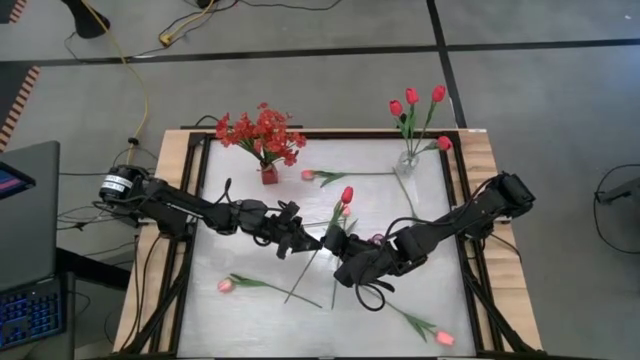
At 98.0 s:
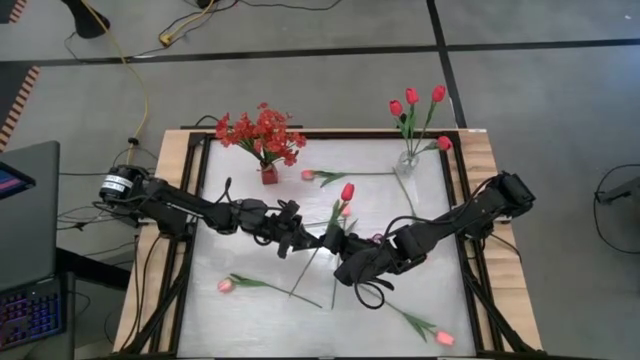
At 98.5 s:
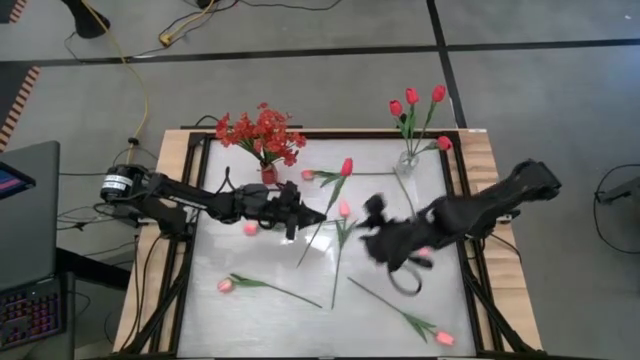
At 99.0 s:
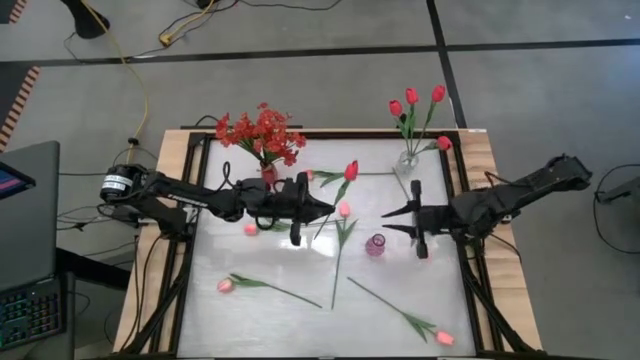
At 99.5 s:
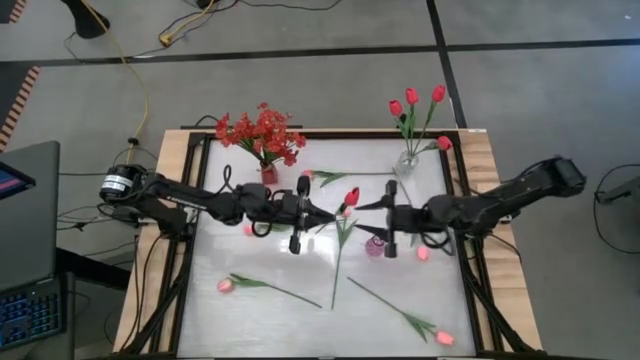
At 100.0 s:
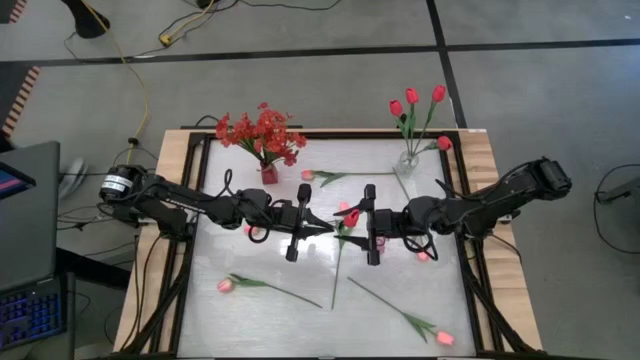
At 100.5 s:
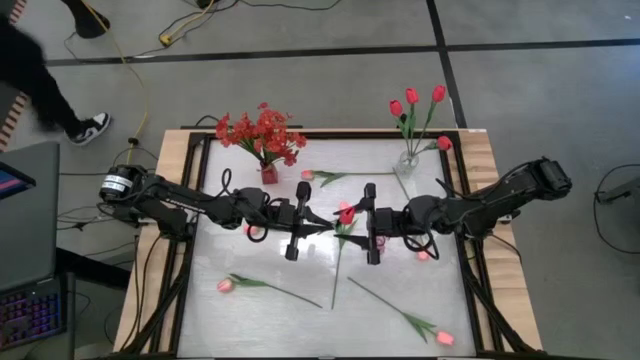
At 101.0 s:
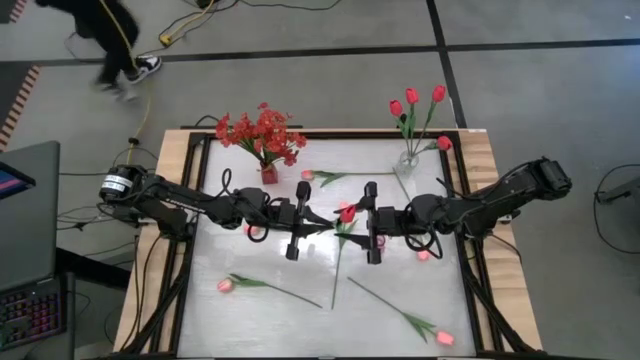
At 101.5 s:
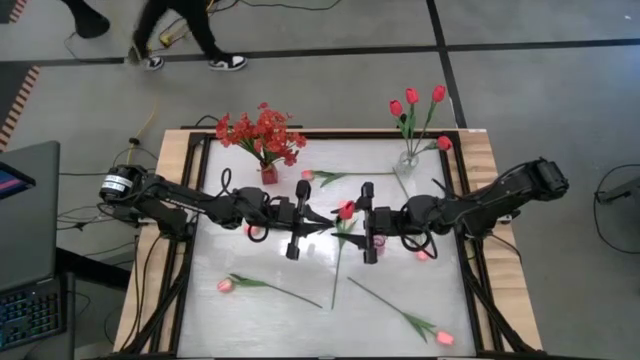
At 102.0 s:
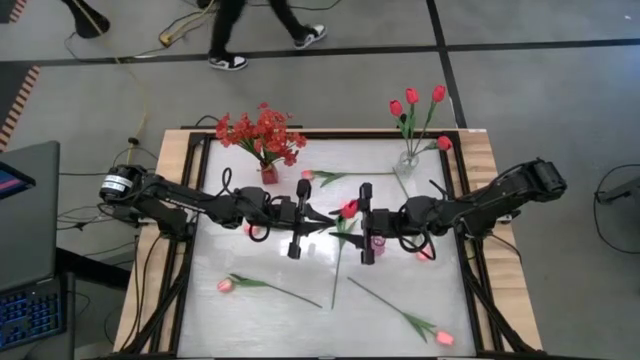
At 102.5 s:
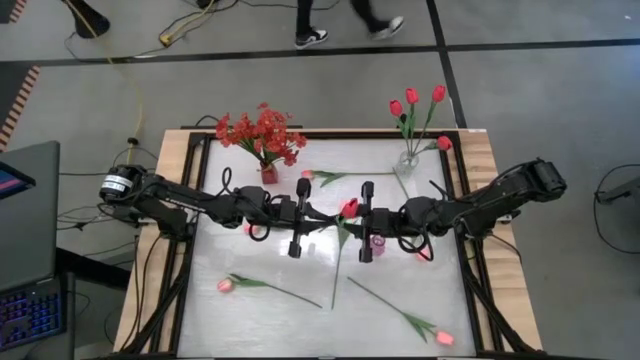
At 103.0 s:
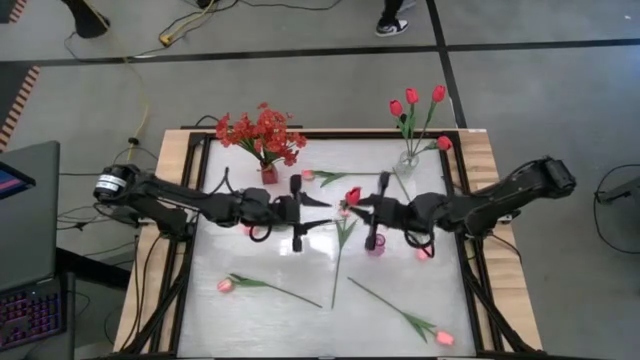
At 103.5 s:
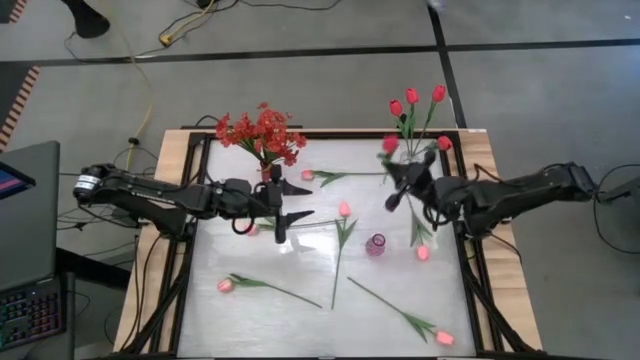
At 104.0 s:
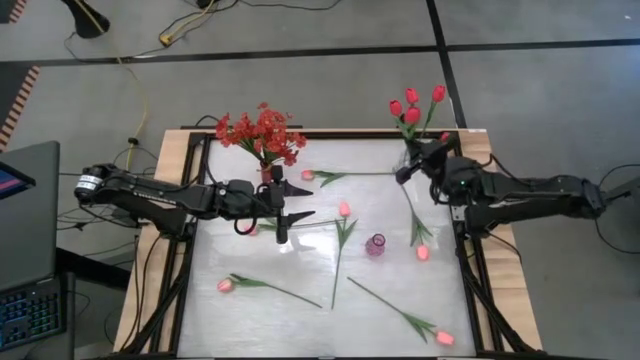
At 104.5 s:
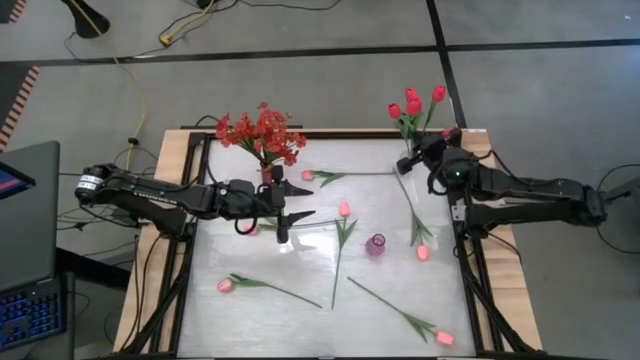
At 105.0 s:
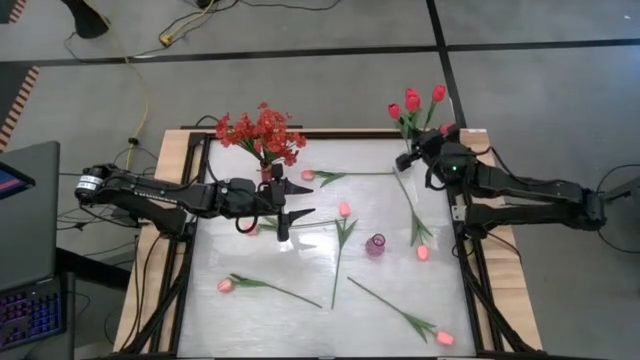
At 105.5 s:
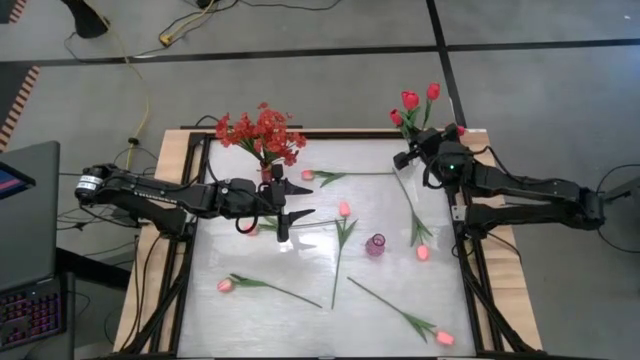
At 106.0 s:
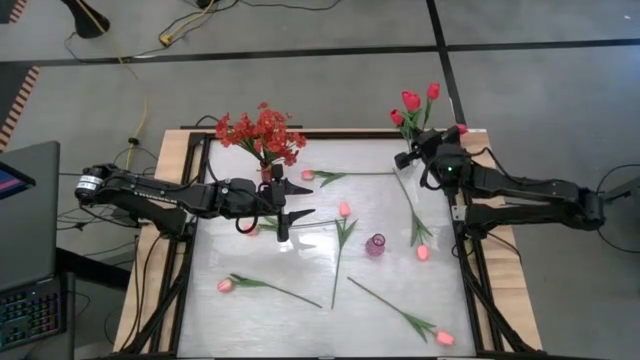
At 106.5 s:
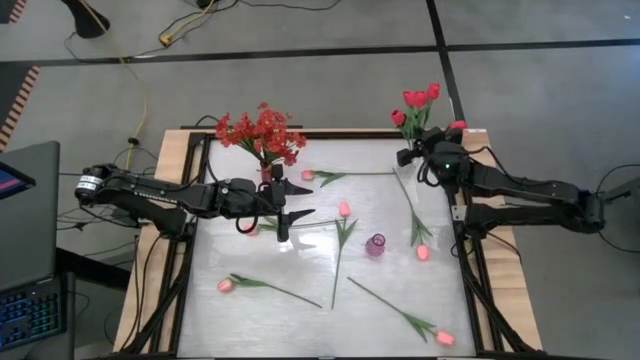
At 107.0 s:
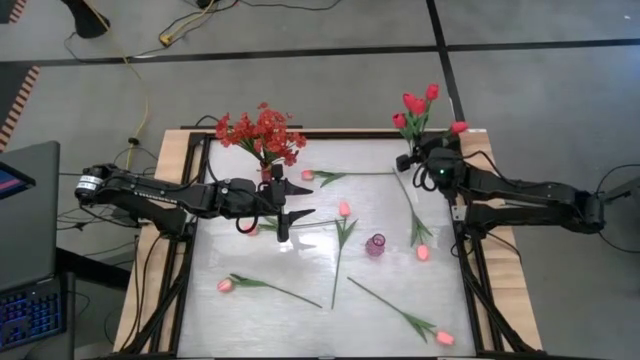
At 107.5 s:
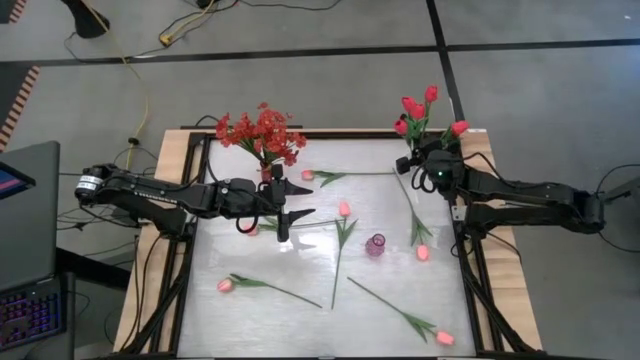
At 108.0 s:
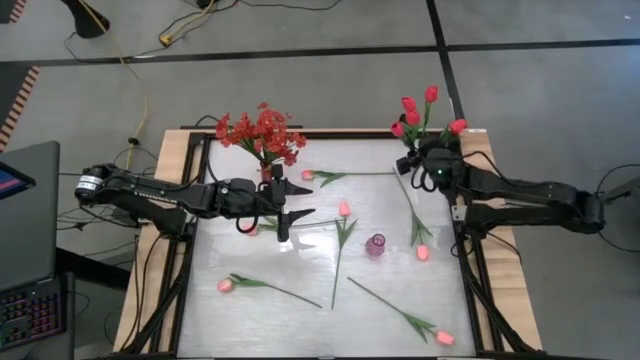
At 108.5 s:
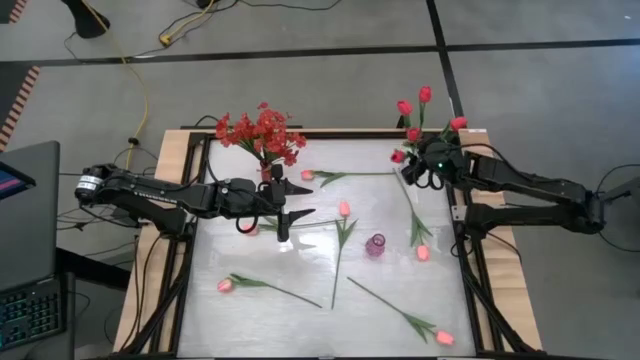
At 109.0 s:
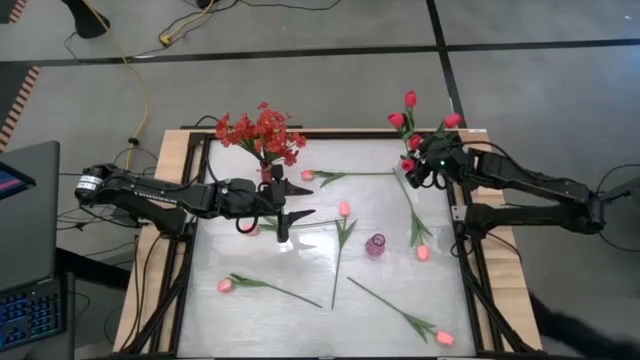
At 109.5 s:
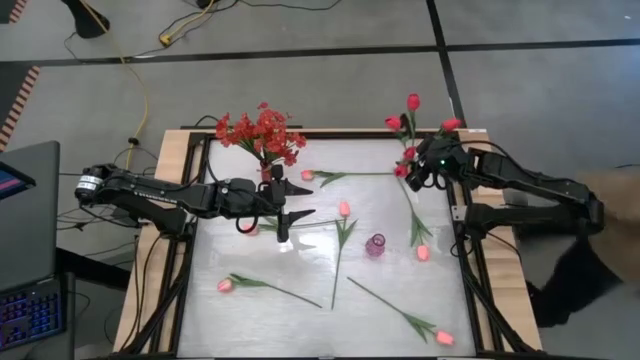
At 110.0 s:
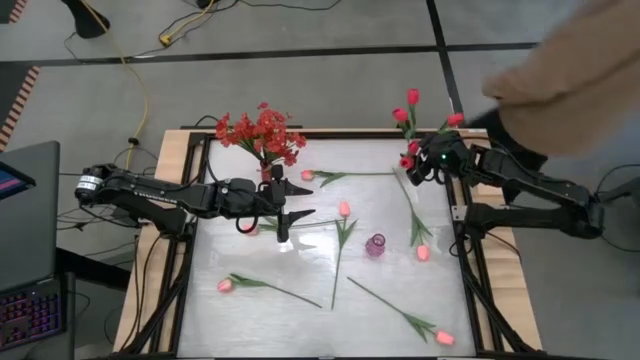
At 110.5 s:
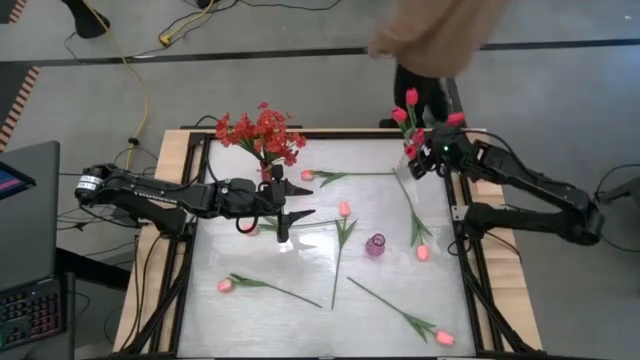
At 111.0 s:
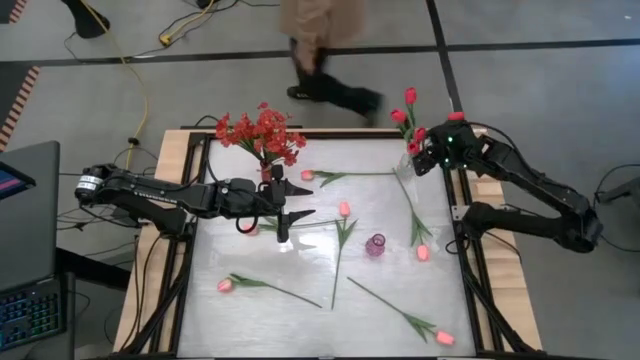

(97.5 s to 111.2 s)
Task: Sort flowers into vase by color
Put the red tulip into the transparent flower vase

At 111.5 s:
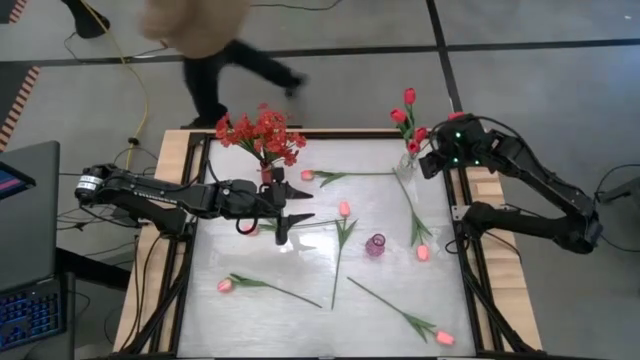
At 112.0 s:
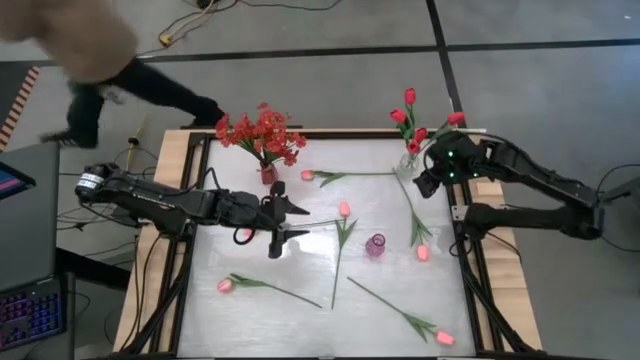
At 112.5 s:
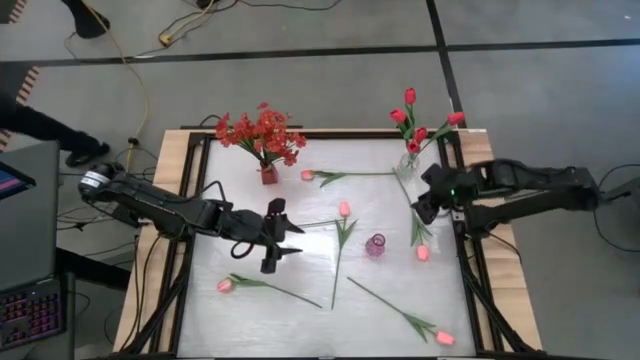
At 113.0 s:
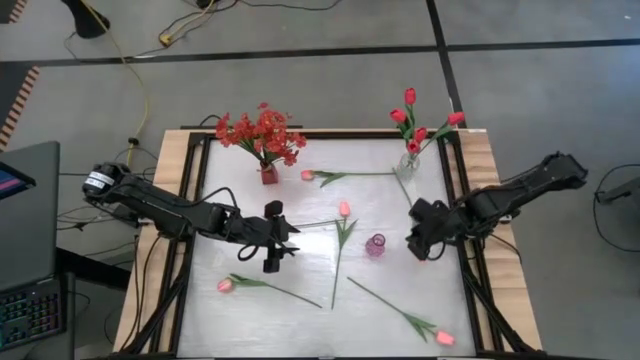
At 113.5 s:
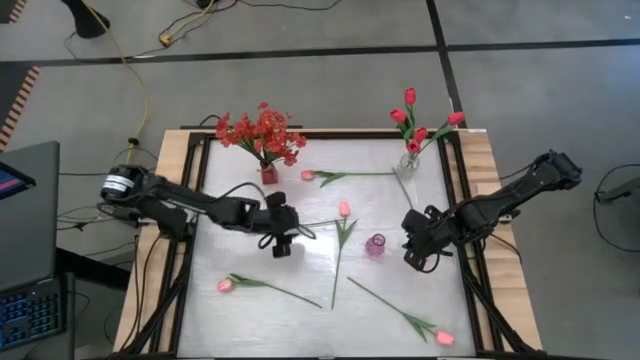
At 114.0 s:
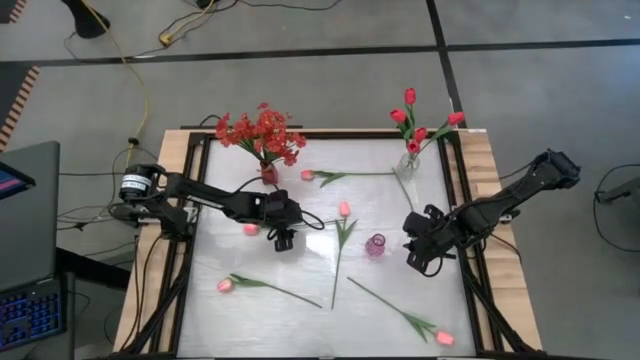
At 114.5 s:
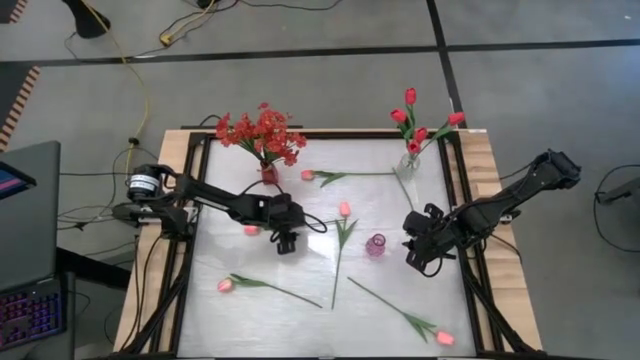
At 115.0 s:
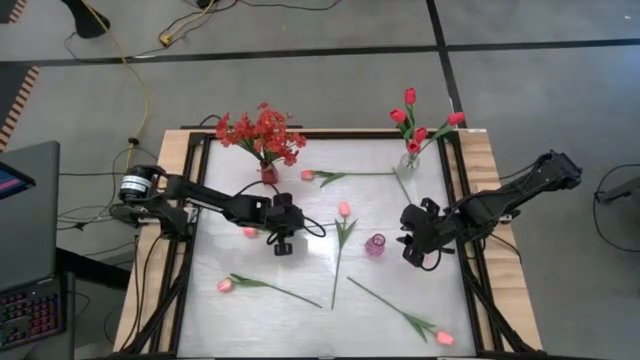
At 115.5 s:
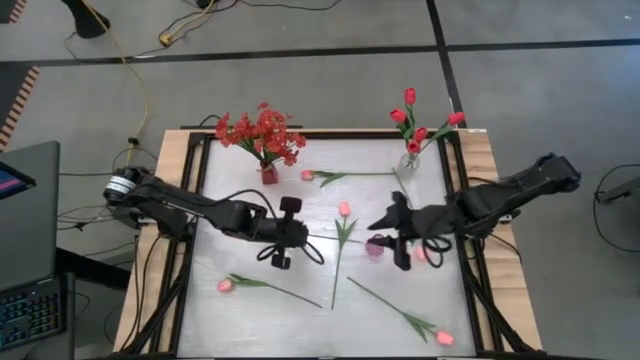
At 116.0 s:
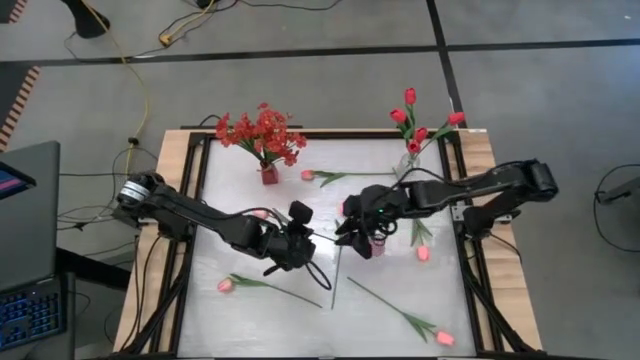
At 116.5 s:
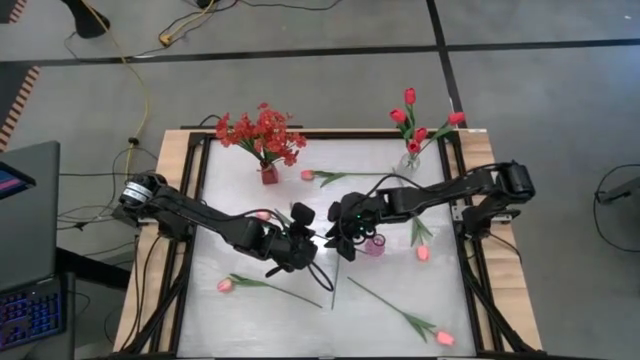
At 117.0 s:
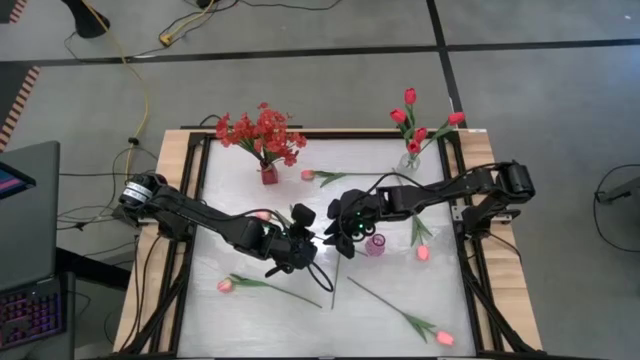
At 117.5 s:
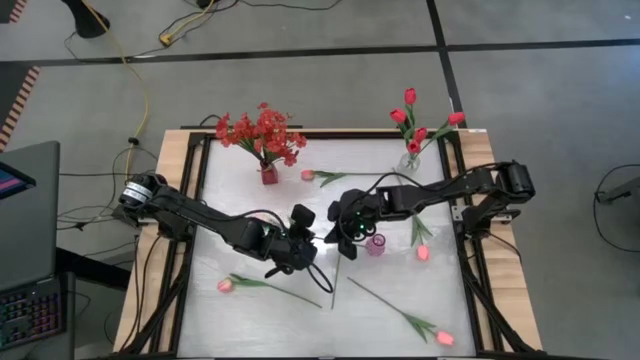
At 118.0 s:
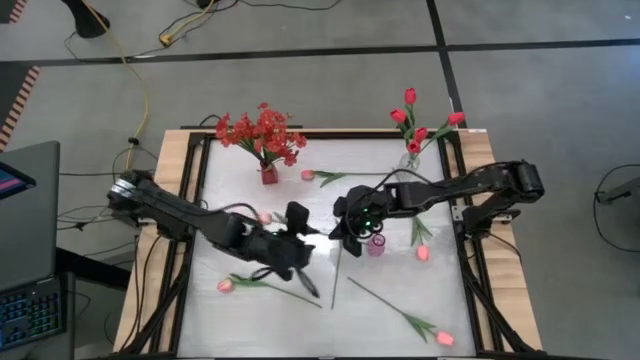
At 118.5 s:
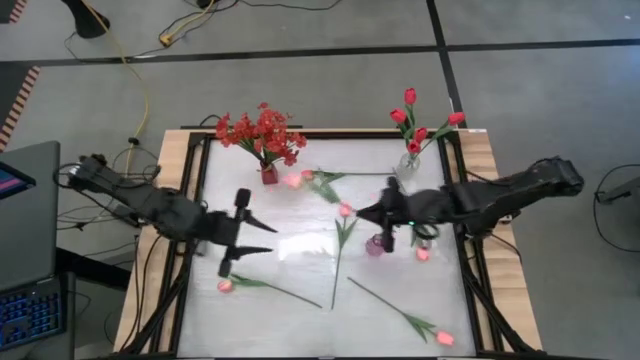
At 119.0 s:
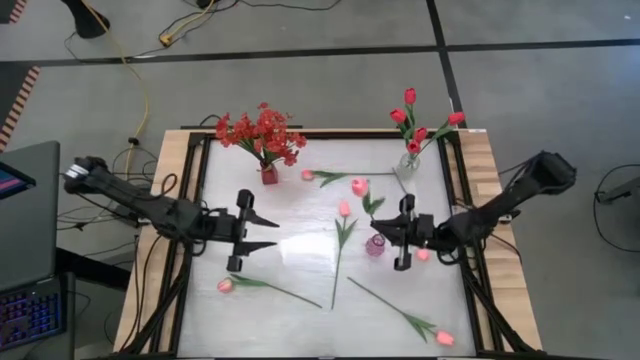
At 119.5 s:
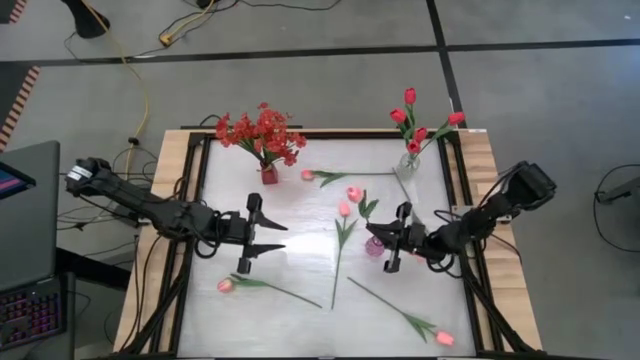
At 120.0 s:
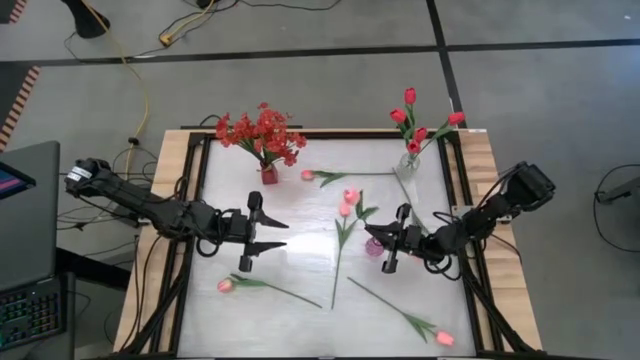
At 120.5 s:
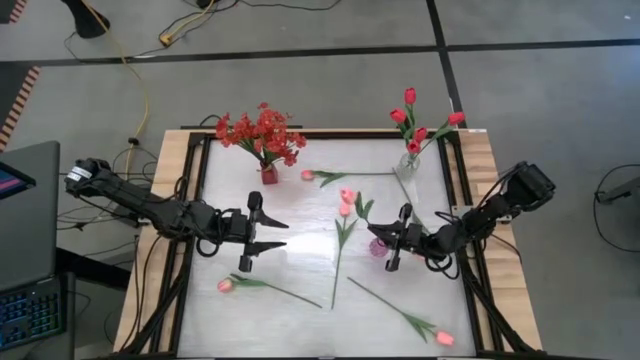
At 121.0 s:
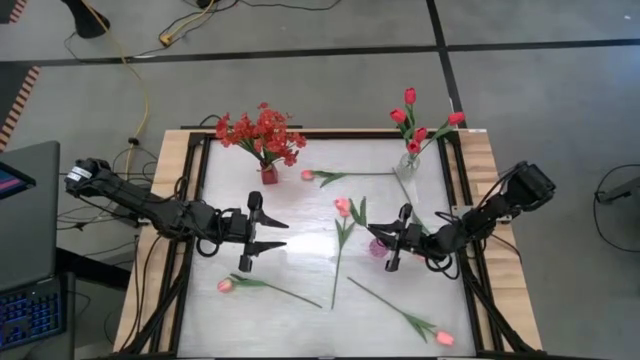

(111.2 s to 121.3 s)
Put the pink tulip into the purple flower vase
